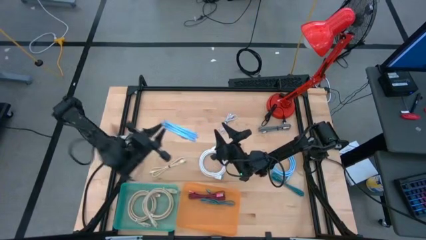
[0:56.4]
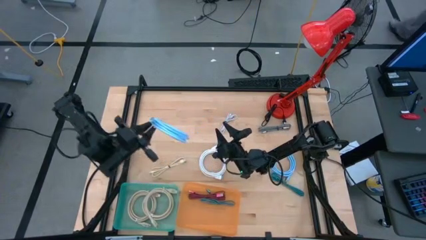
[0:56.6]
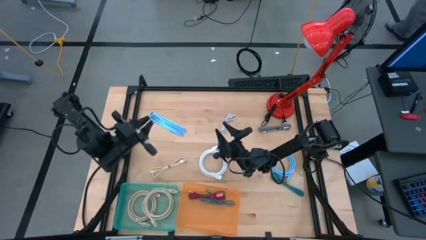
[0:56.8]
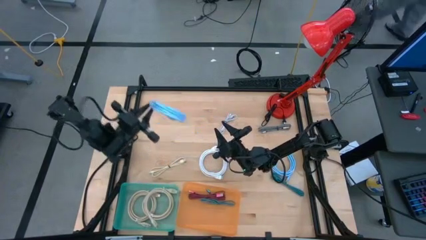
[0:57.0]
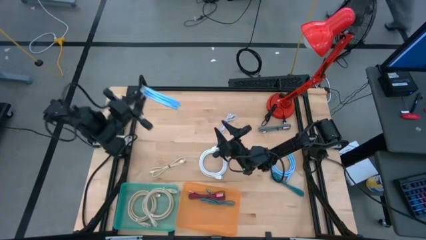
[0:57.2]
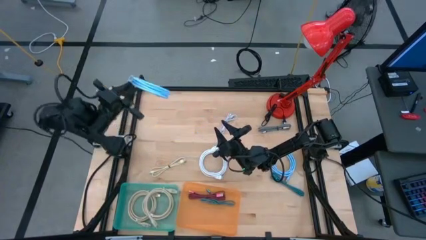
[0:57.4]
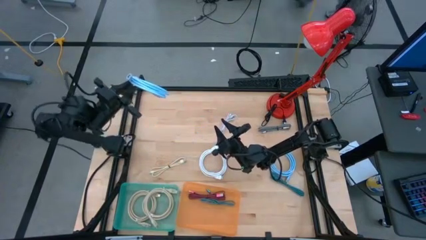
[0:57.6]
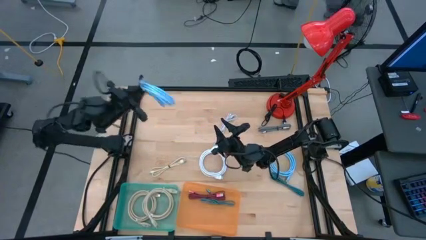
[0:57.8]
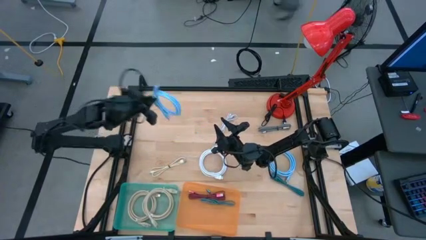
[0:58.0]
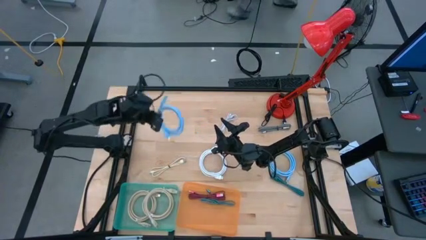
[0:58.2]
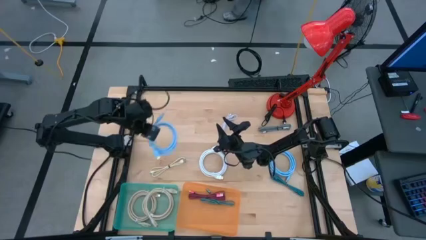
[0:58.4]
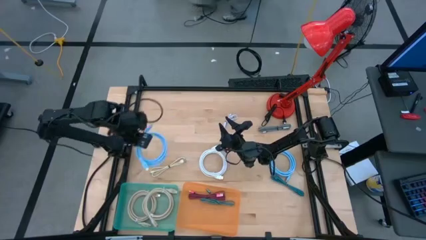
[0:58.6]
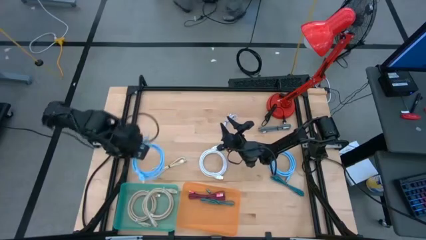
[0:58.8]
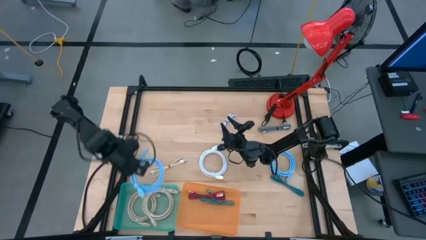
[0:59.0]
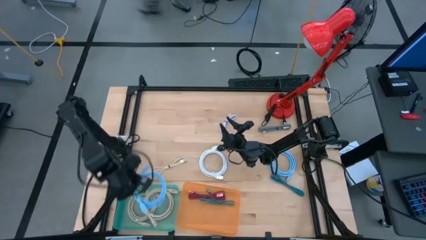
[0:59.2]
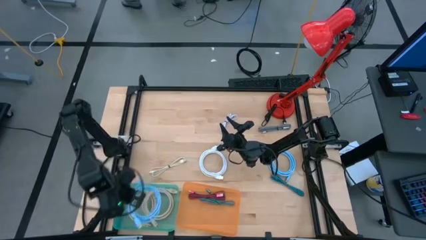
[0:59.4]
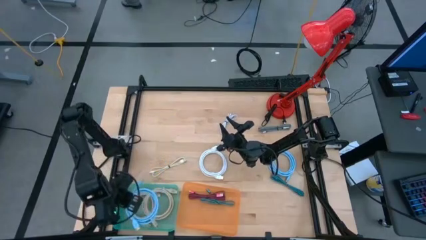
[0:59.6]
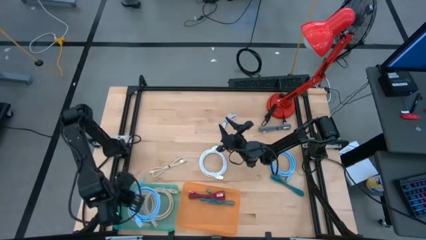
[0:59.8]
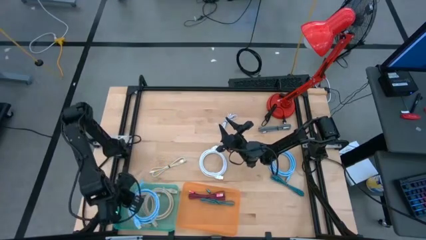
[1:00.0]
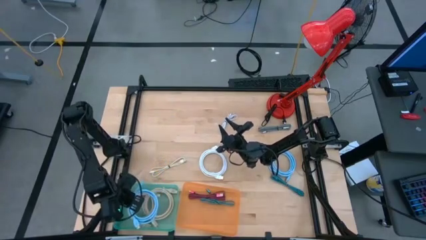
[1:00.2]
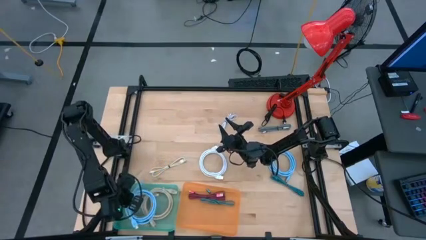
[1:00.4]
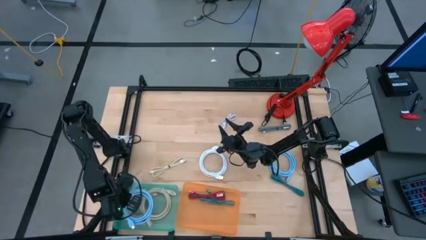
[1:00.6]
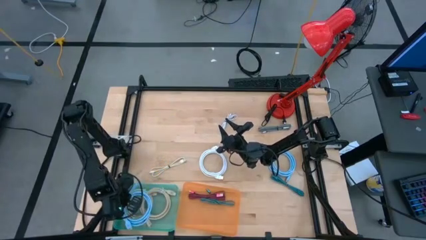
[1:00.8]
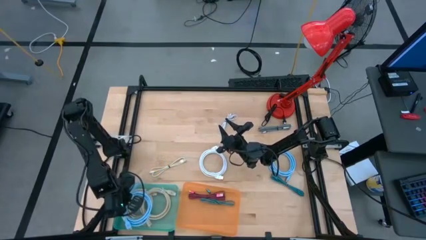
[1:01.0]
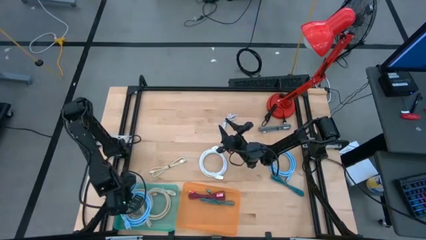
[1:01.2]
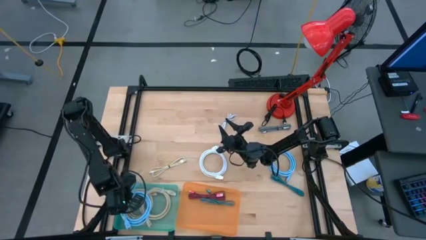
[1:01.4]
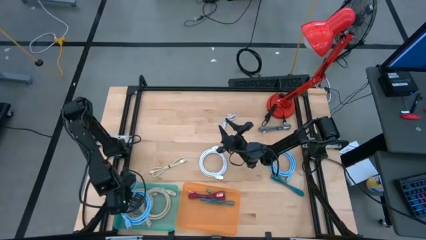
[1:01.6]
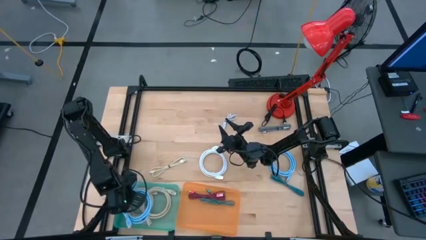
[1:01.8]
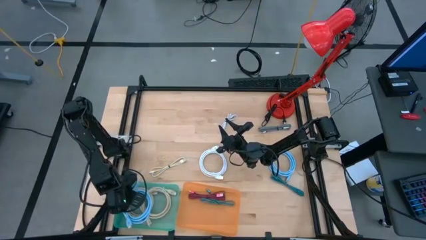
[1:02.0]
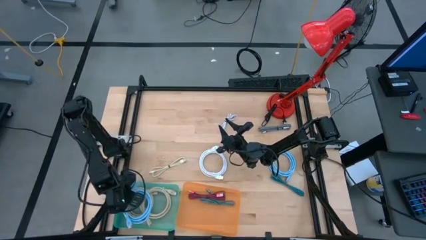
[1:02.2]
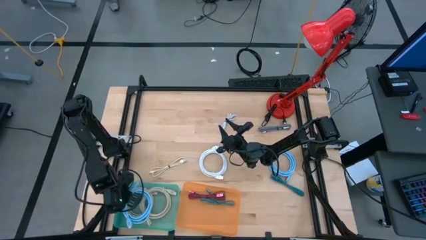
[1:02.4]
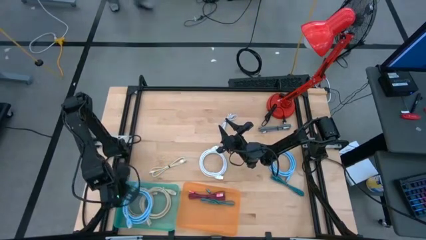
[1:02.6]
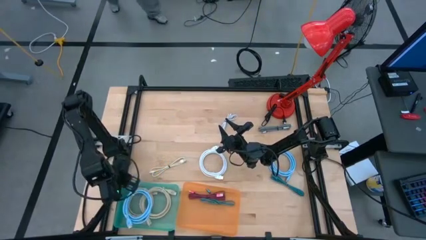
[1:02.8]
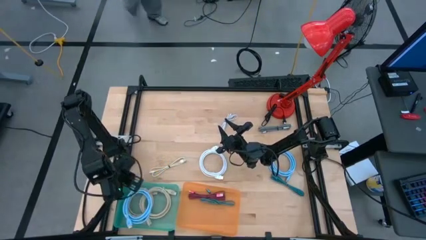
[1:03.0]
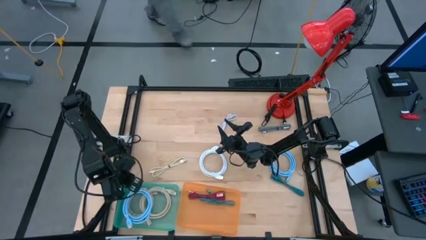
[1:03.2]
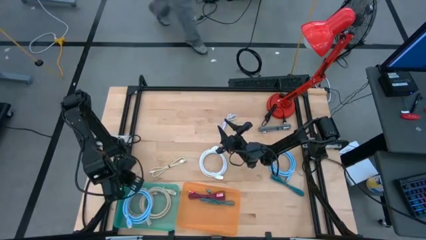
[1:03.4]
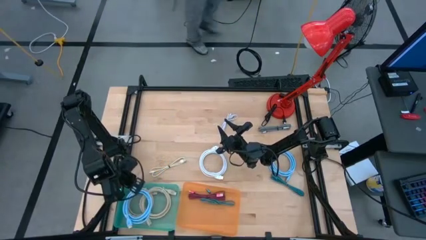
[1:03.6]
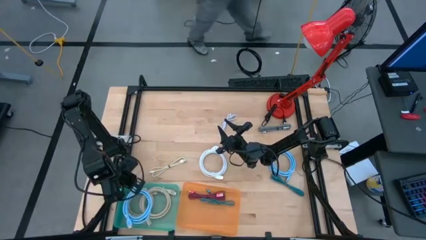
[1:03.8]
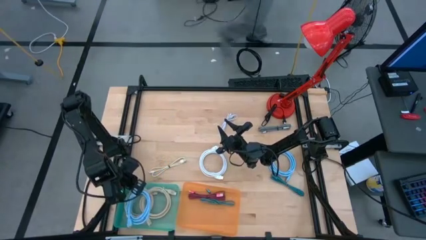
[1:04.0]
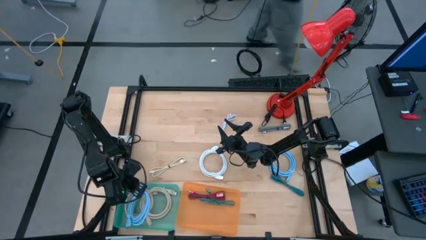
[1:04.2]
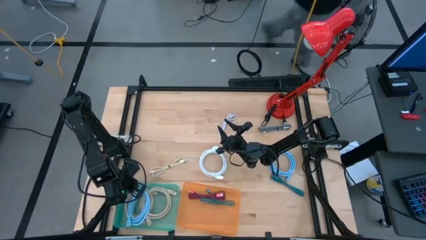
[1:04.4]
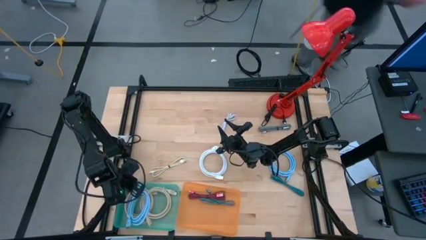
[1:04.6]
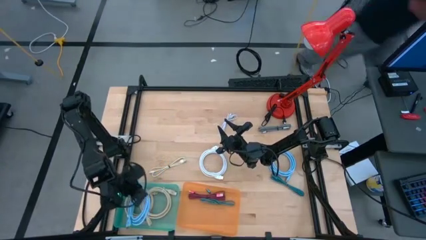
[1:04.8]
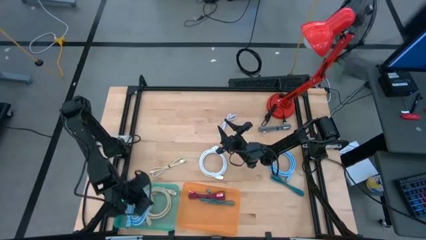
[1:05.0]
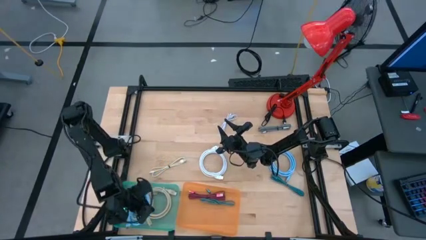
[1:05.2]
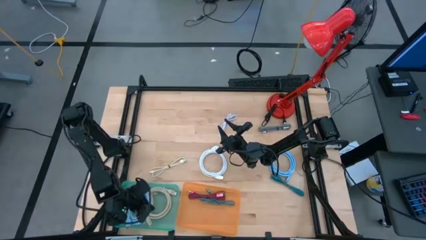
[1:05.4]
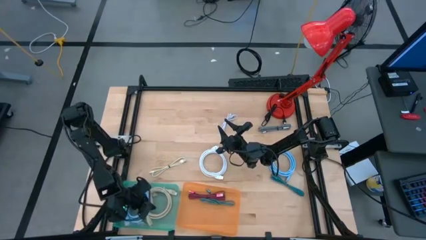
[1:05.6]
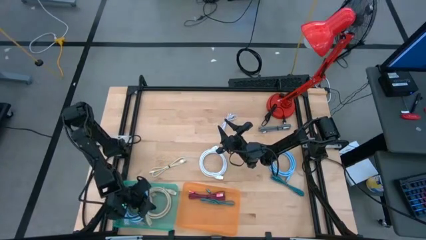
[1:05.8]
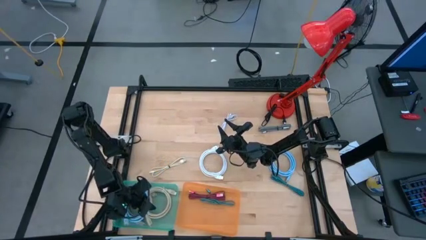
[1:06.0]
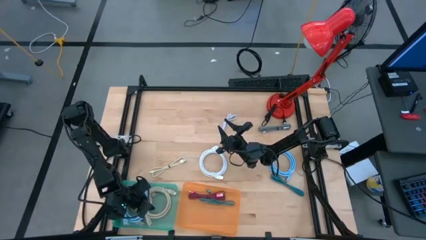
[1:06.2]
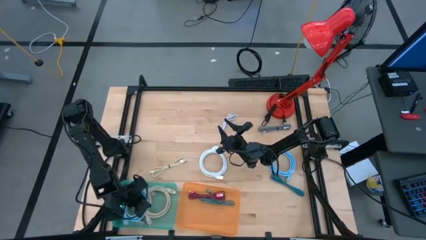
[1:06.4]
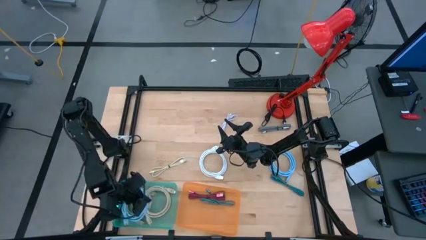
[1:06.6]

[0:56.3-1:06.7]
Task: Pick & Place USB Port
Put the left blue HDMI cable into the green bin

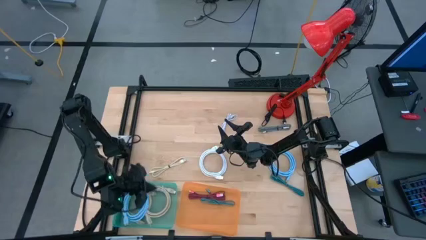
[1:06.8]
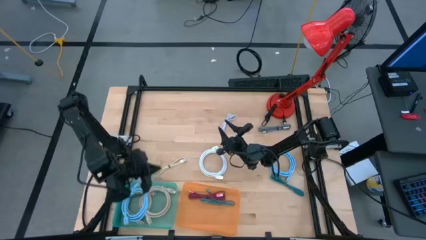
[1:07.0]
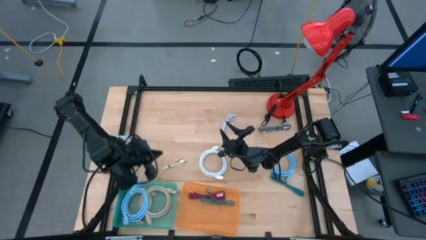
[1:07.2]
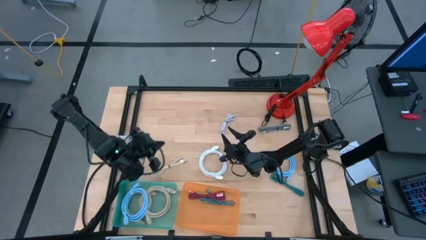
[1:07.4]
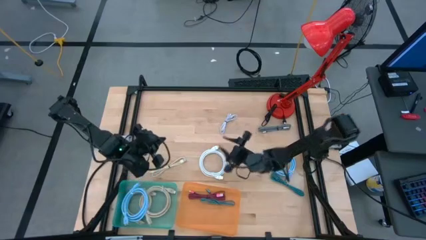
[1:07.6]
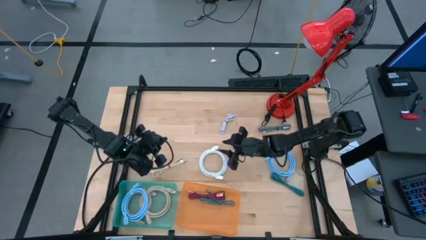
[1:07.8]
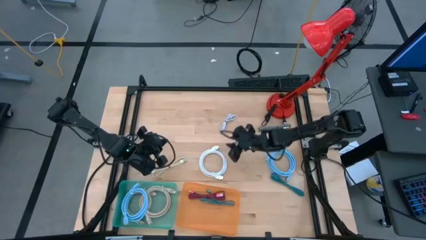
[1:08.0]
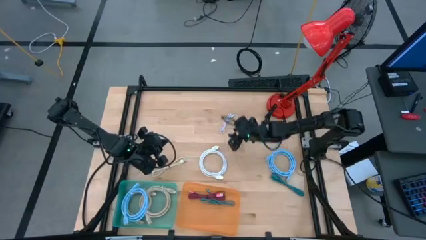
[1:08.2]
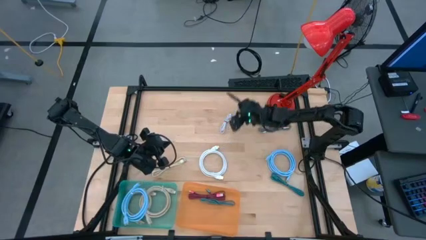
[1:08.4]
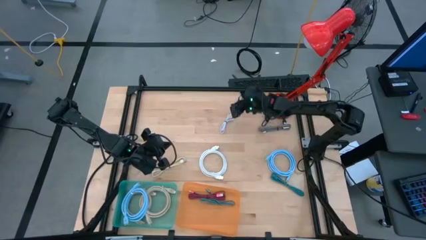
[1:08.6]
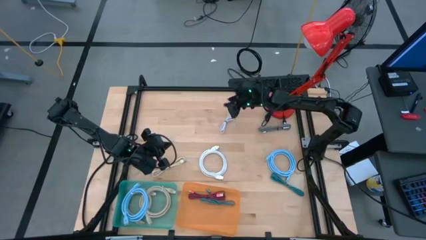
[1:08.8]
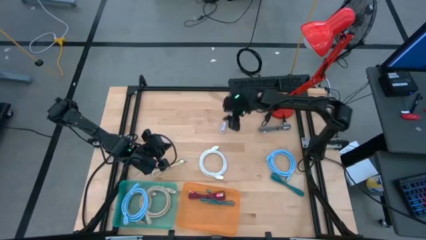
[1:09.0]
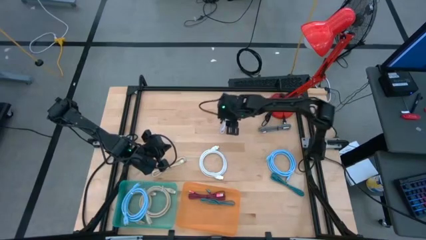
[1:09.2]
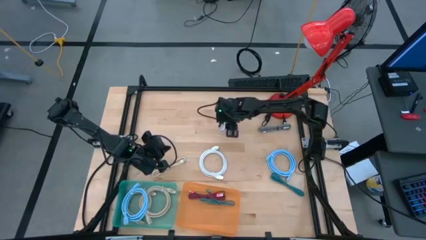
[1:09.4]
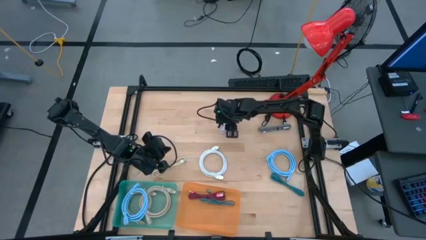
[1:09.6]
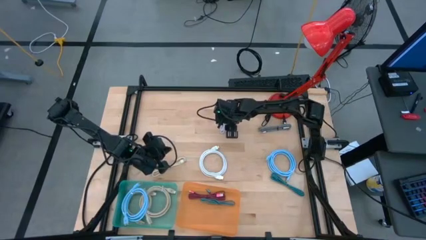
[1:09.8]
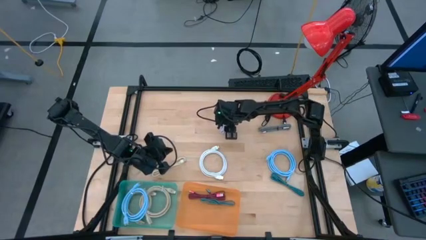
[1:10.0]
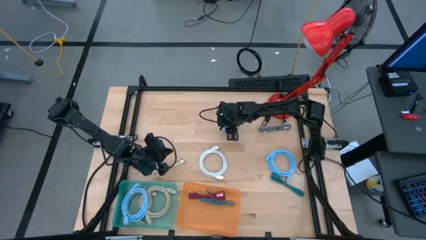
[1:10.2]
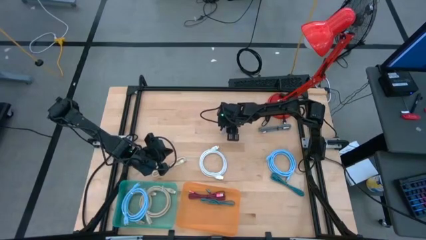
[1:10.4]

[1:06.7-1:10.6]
Put the white charger cable into the orange bin

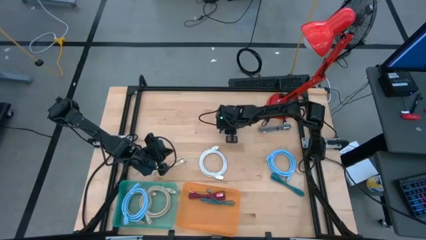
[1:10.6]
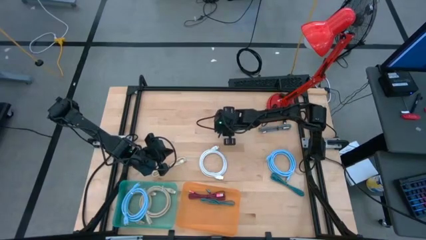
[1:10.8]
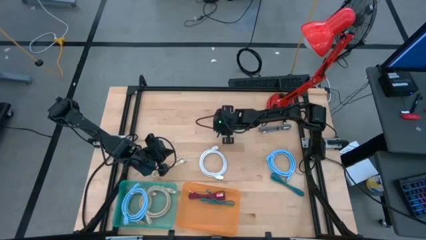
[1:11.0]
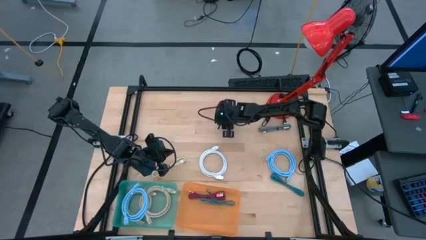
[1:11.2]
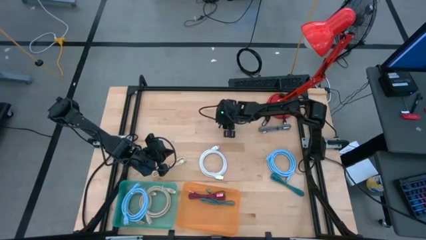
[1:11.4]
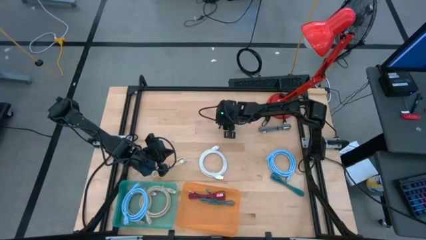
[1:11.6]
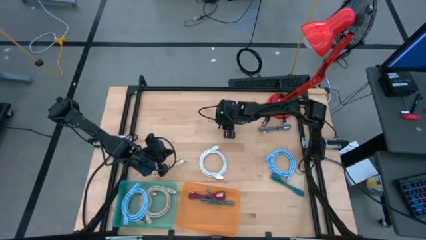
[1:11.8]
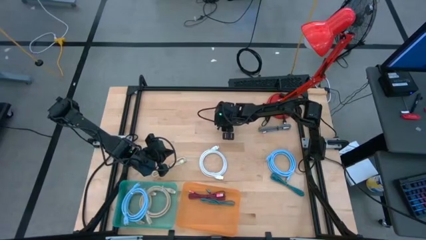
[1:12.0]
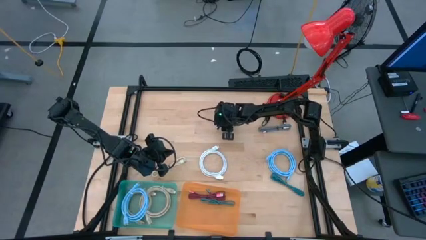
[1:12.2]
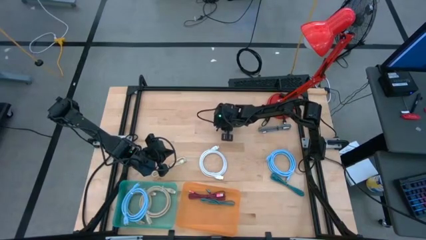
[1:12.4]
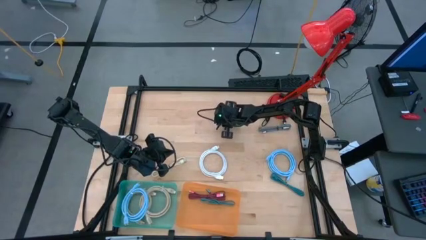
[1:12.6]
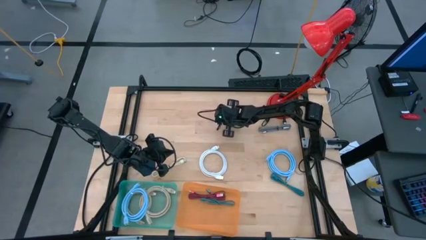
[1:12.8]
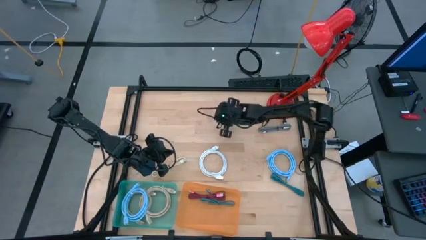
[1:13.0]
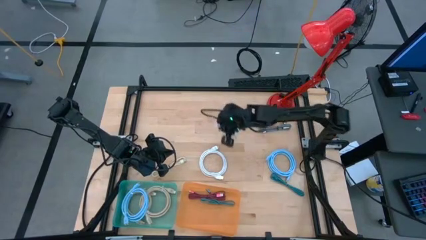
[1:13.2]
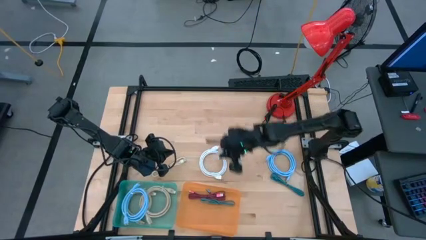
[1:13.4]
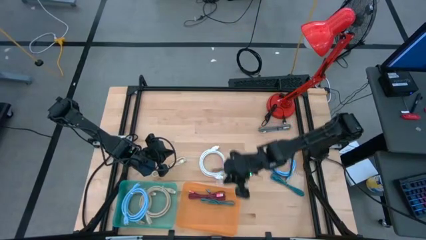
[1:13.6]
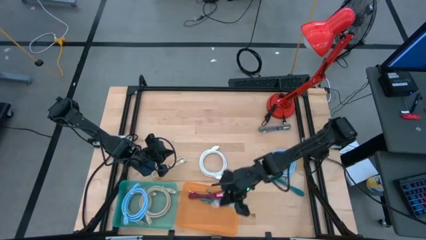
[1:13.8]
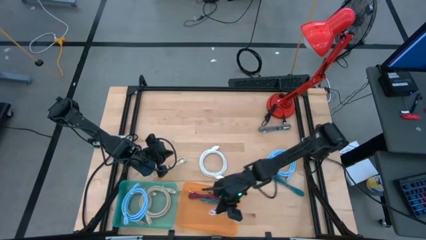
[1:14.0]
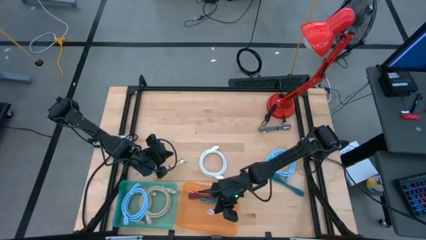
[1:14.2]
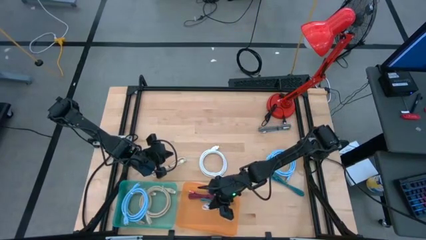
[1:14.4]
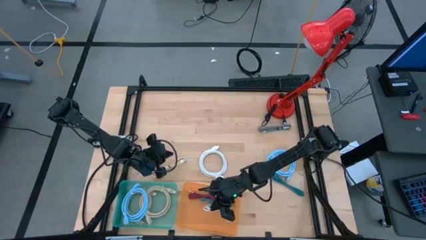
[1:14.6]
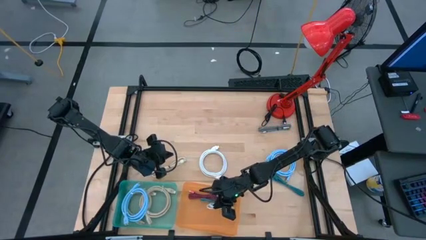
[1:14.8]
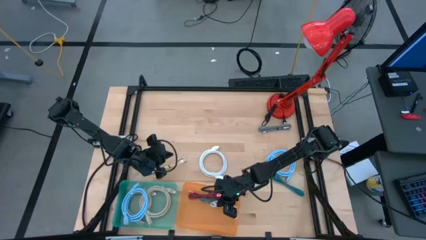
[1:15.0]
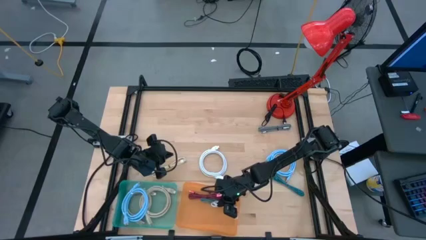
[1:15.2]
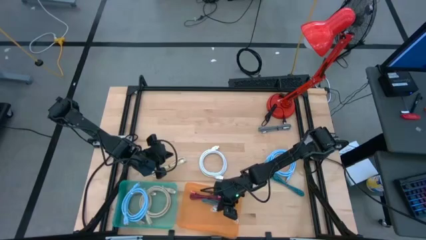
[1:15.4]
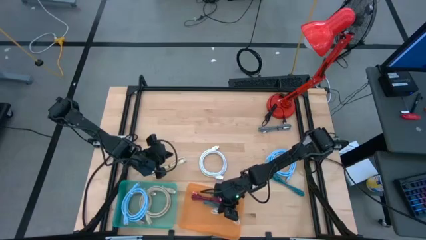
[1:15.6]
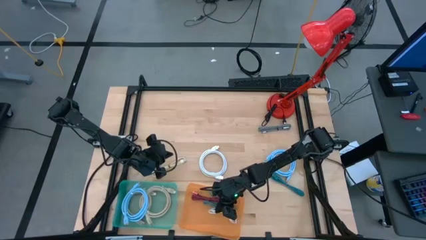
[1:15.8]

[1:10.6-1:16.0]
Put the white charger cable into the orange bin
